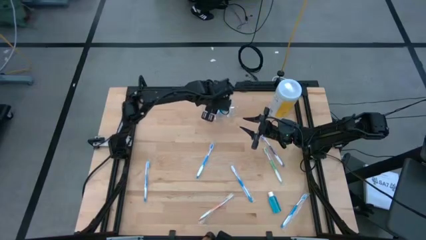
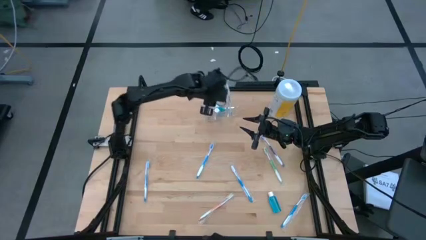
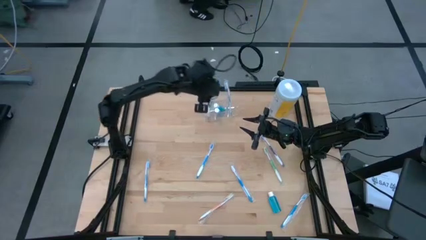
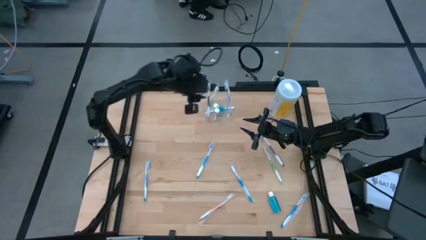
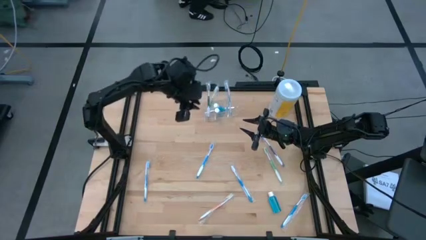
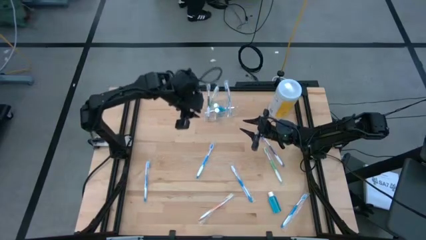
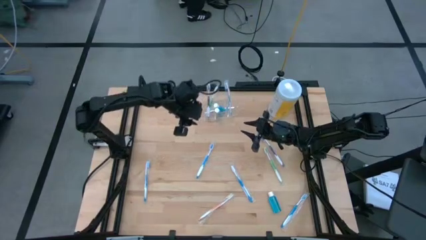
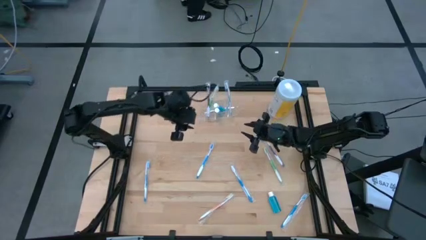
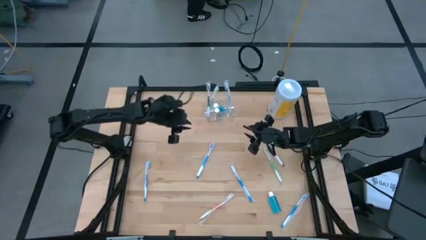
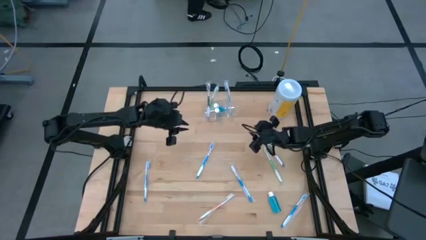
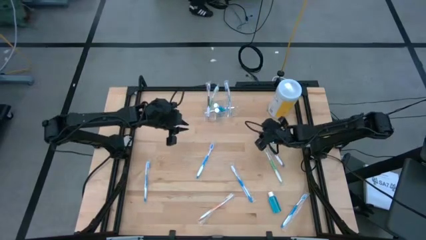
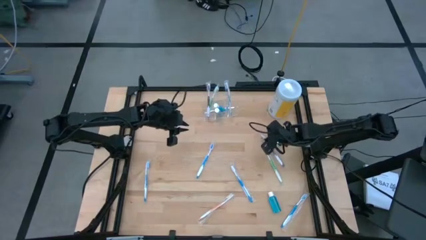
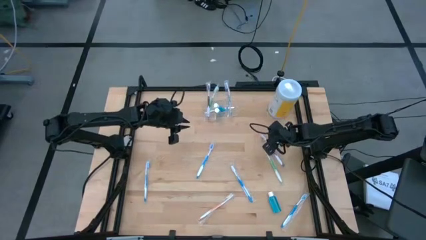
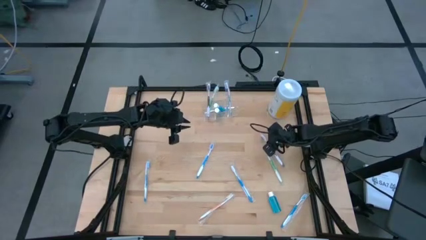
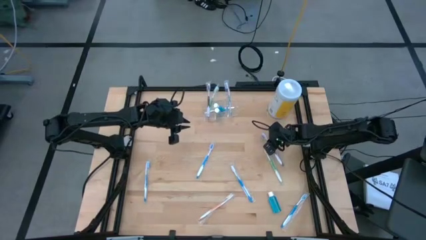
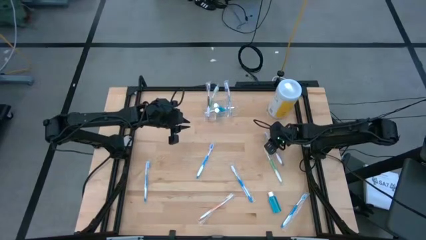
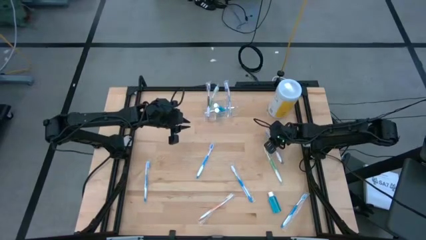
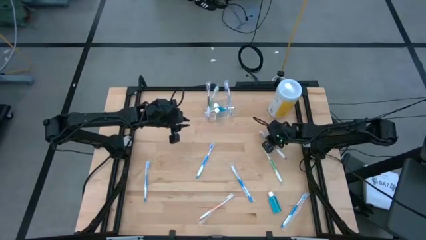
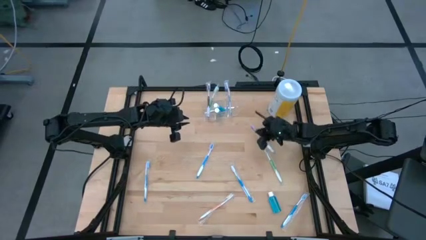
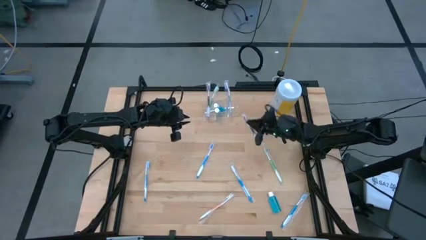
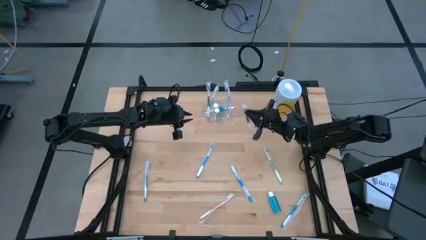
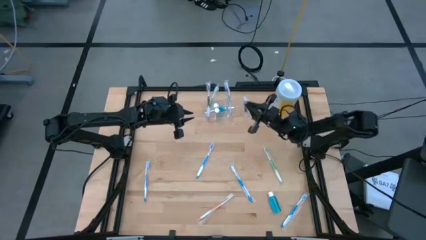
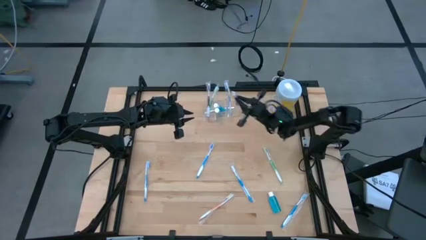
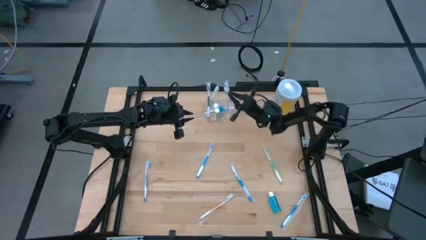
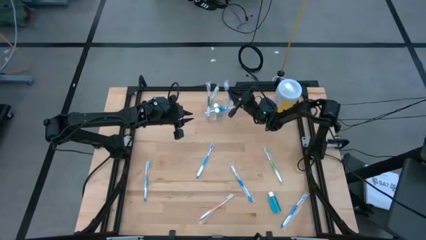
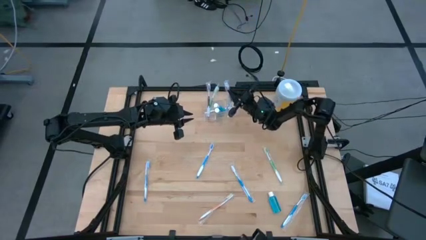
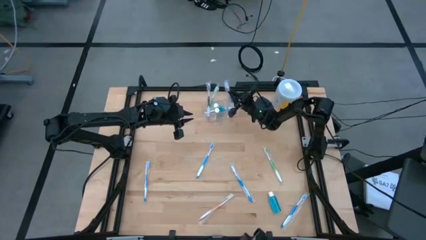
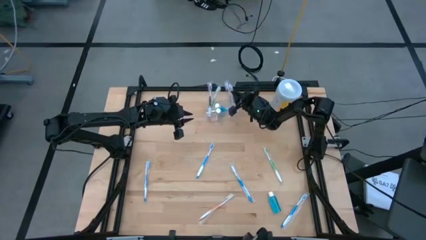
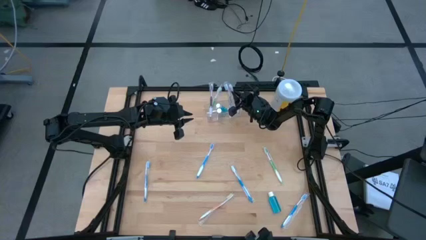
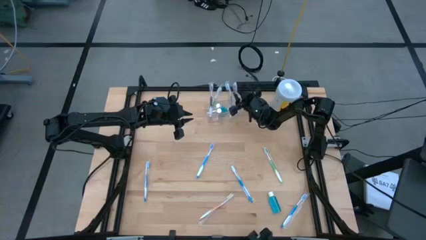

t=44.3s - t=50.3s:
Task: Pick & Place toothbrushing station
Put the violet toothbrush into the transparent organizer

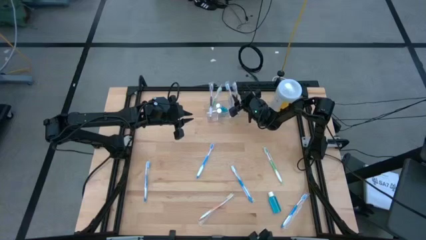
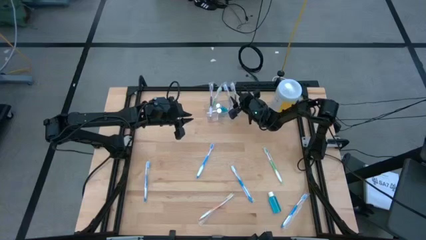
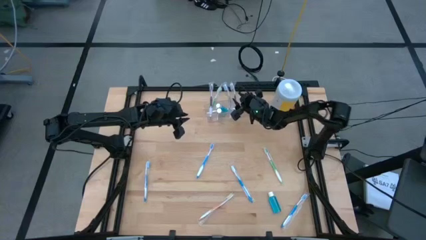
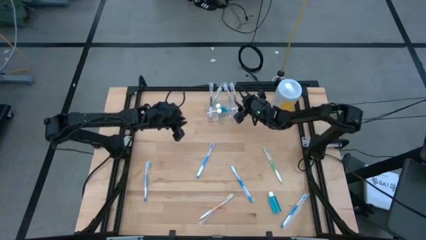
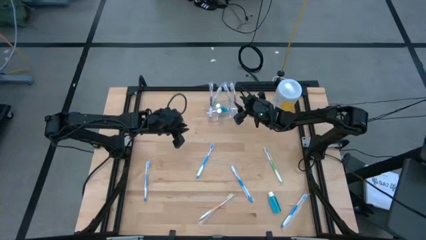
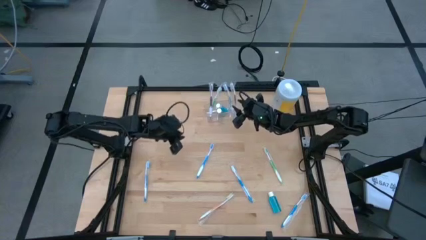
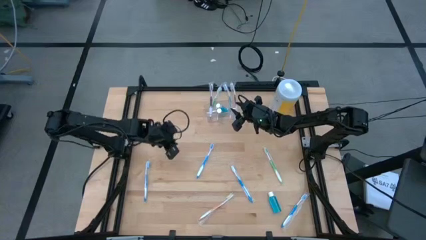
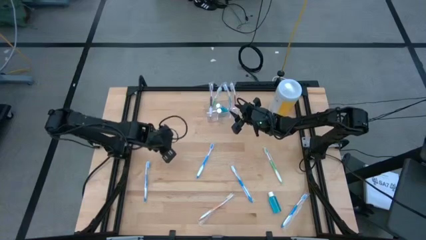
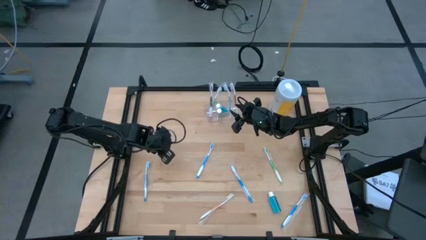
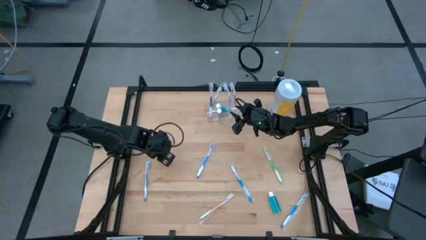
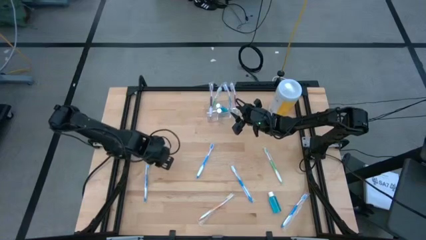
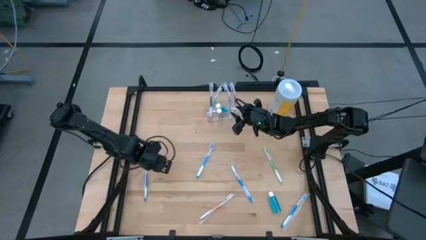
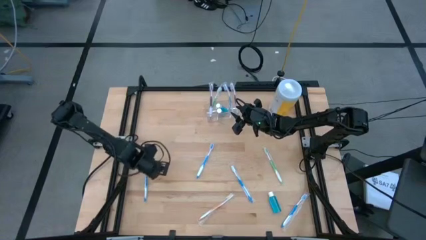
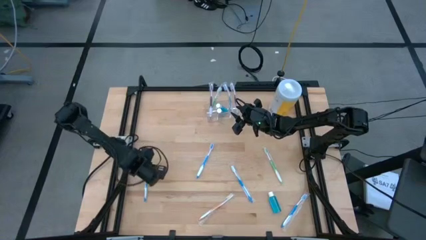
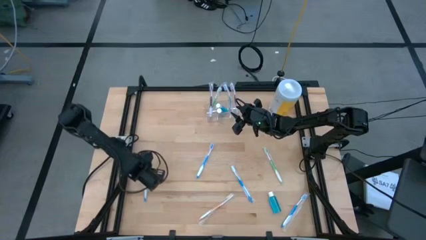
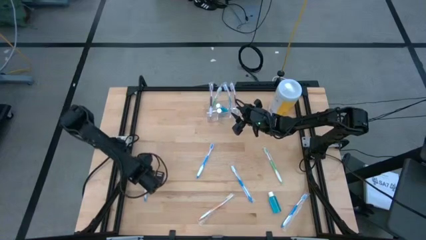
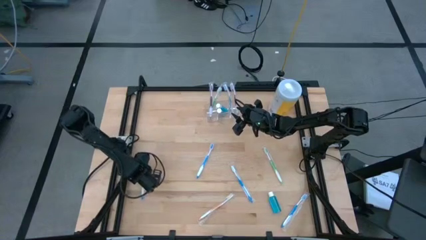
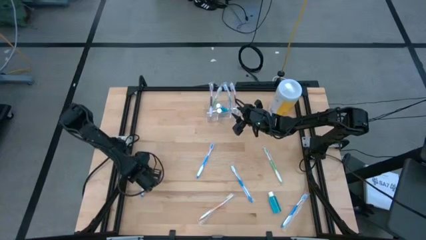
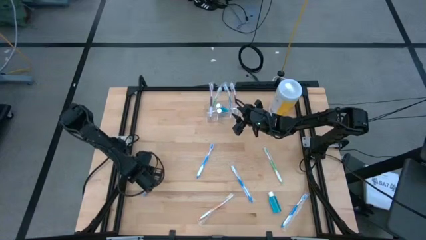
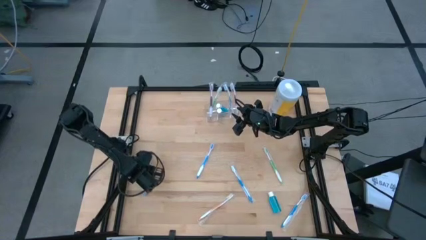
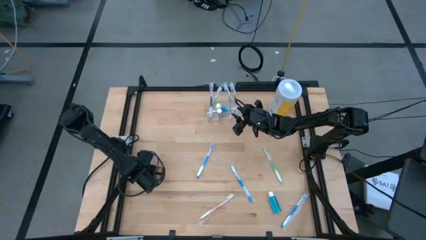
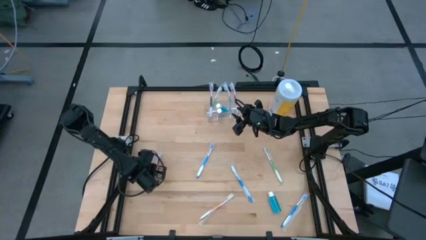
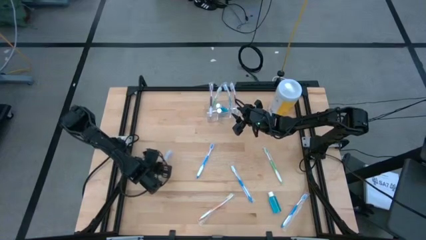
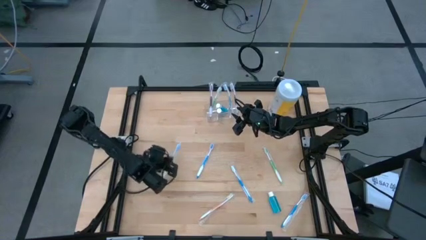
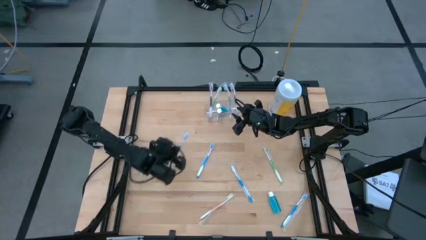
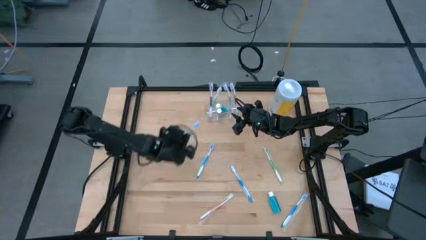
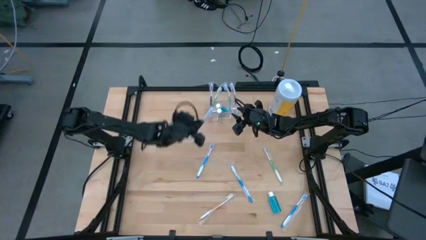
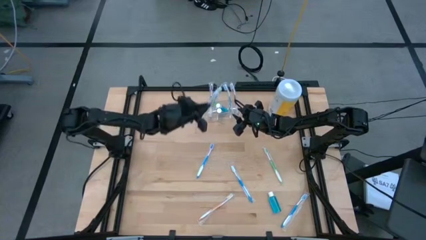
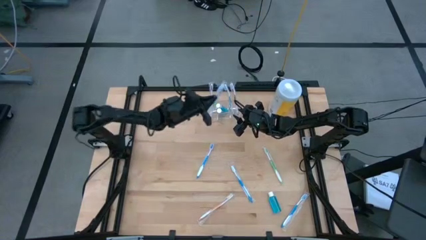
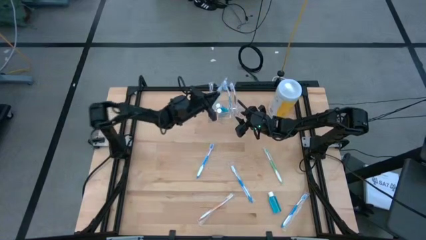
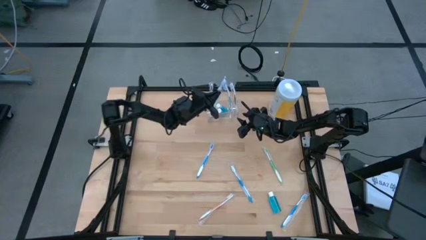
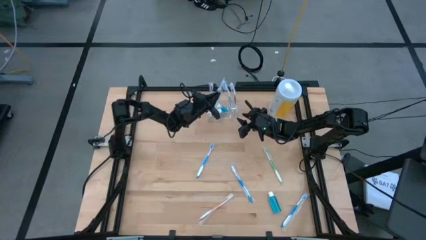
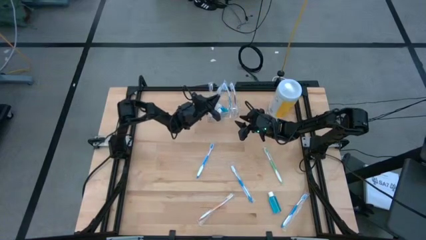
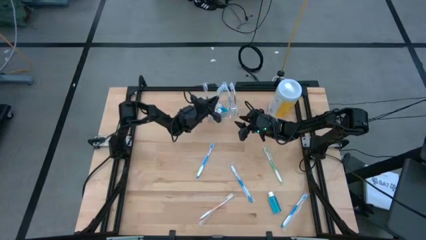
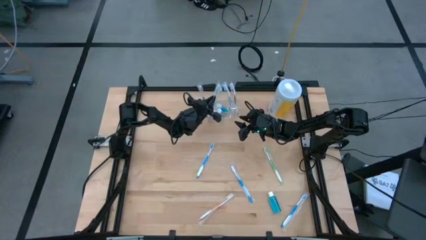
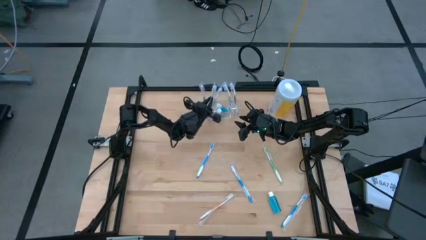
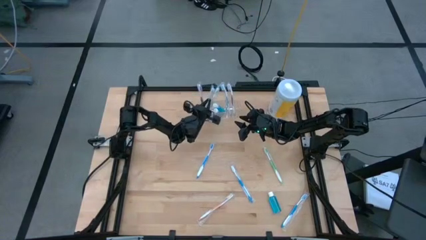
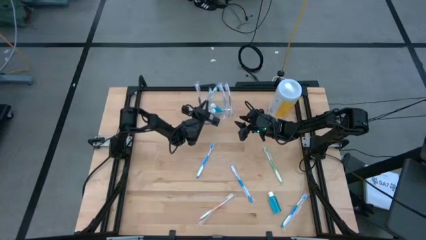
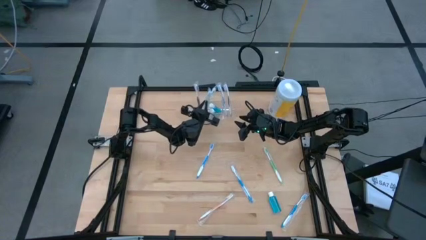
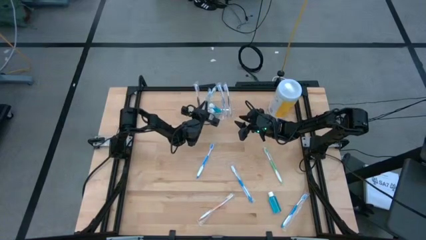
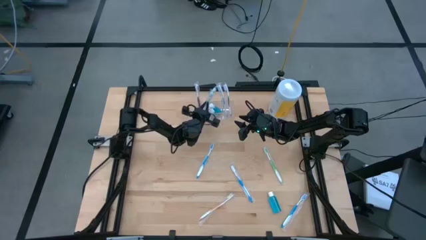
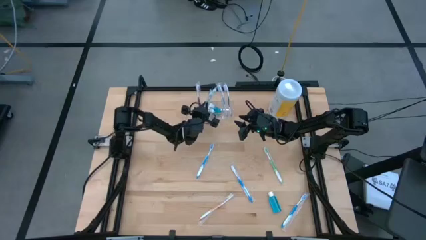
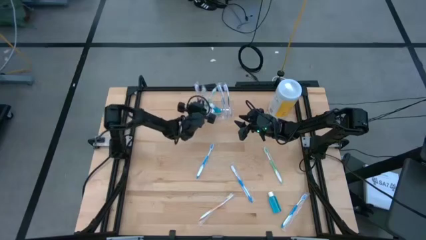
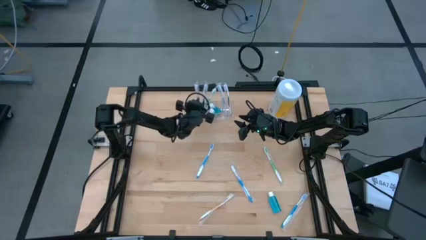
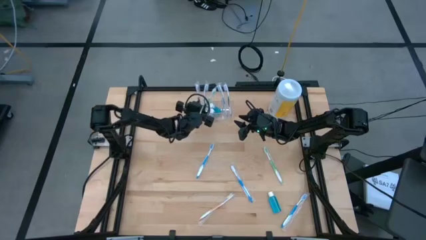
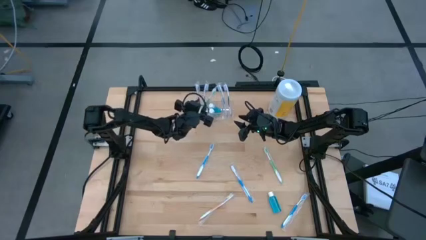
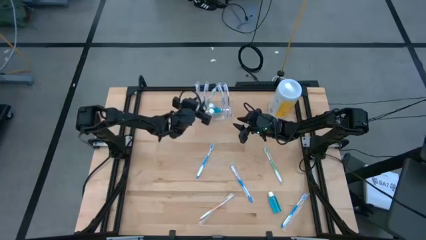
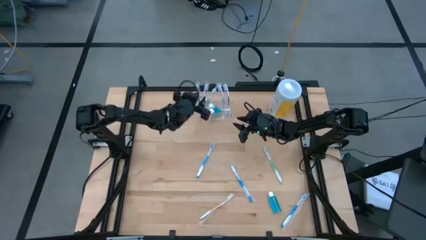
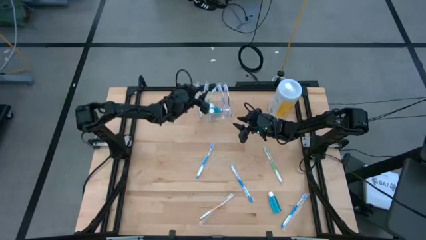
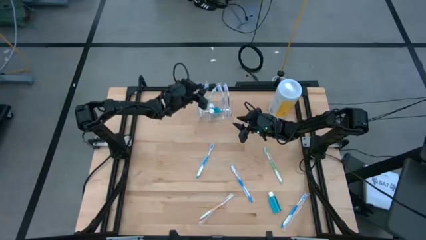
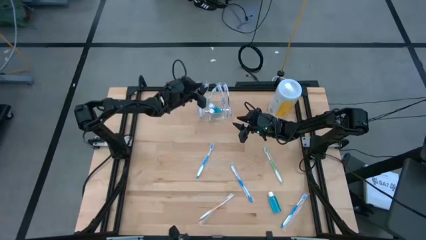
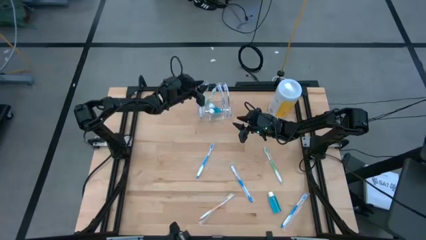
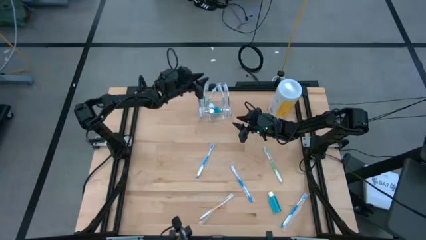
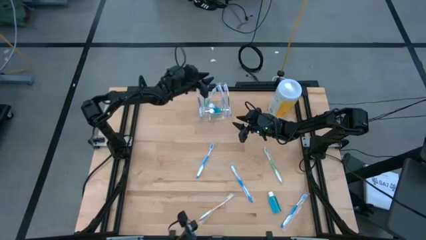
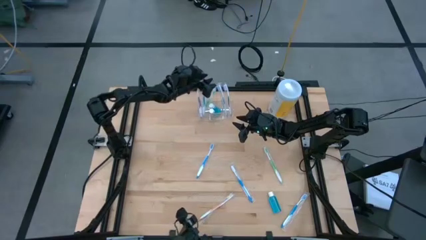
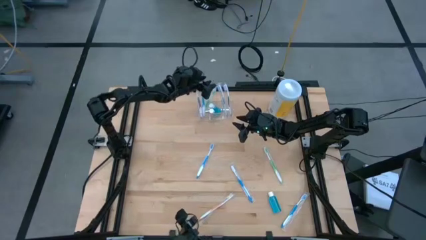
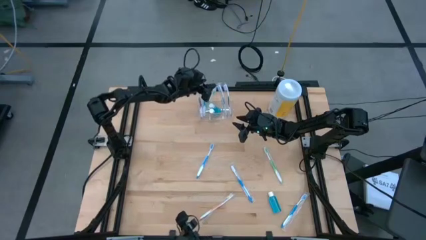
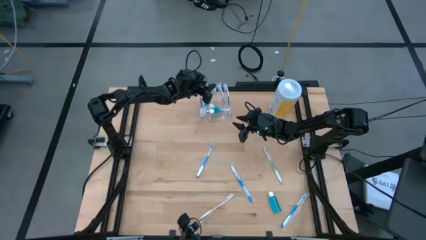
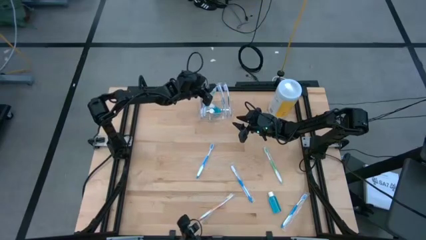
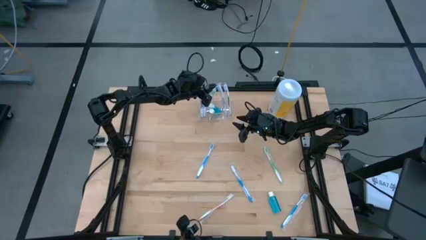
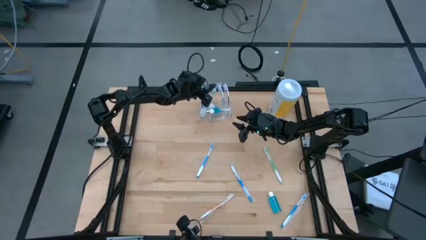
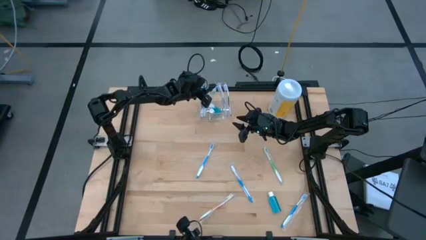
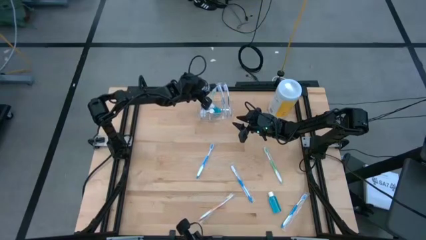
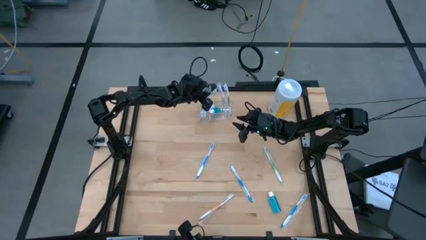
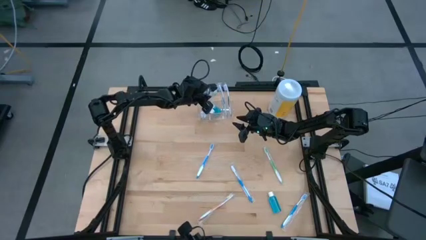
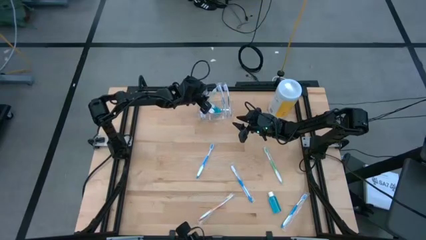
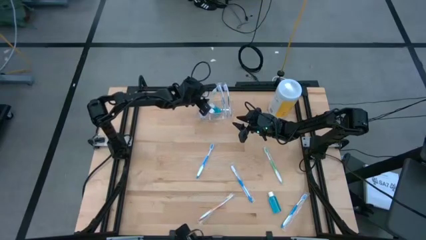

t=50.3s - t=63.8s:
Put the blue toothbrush into the transparent organizer
